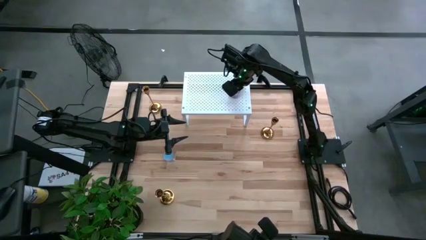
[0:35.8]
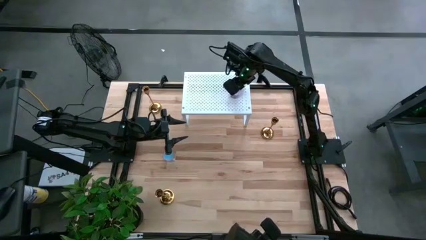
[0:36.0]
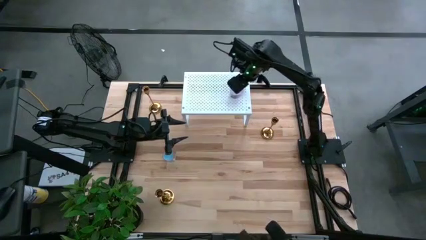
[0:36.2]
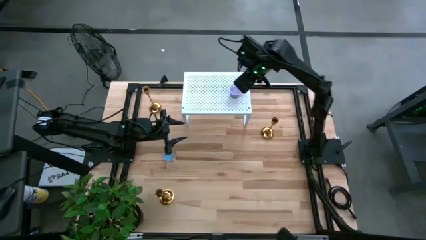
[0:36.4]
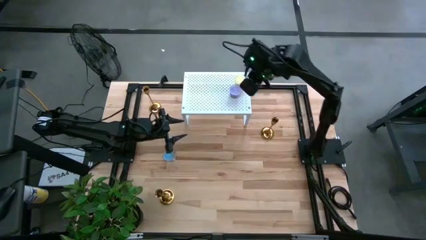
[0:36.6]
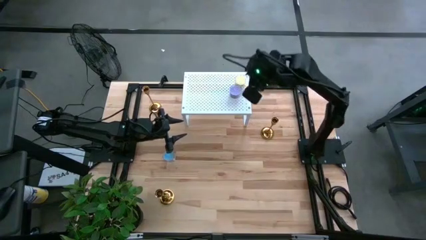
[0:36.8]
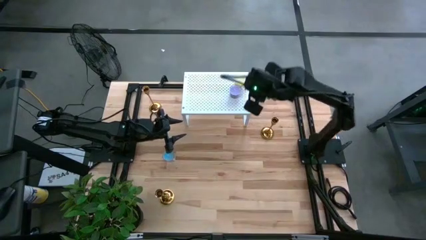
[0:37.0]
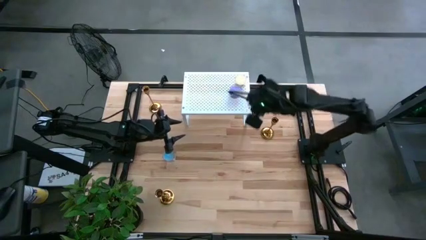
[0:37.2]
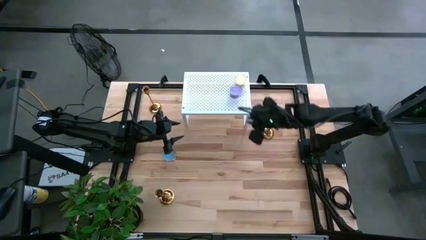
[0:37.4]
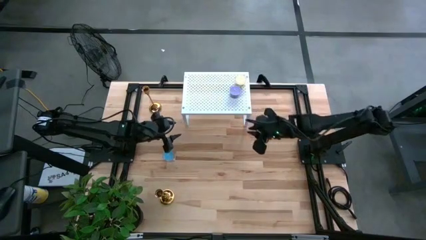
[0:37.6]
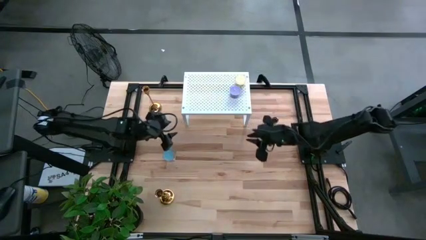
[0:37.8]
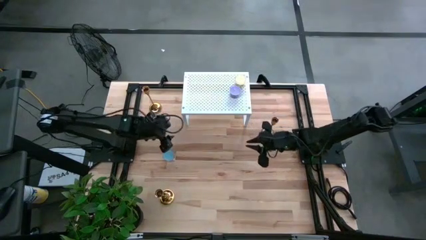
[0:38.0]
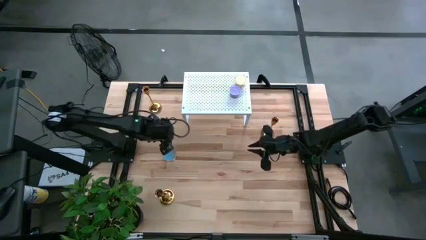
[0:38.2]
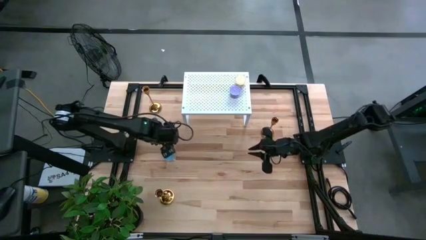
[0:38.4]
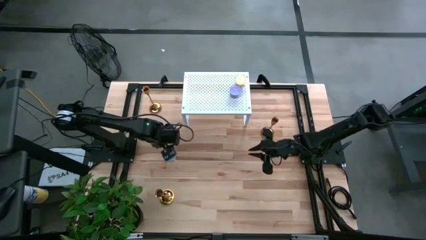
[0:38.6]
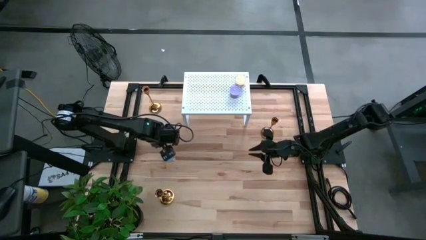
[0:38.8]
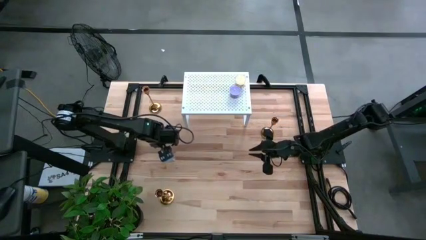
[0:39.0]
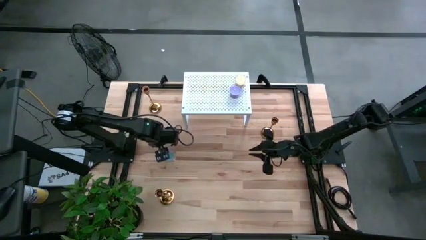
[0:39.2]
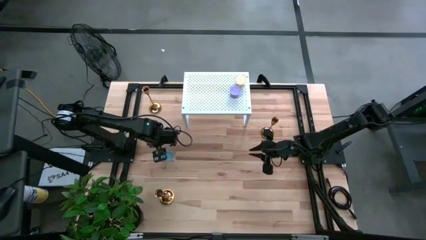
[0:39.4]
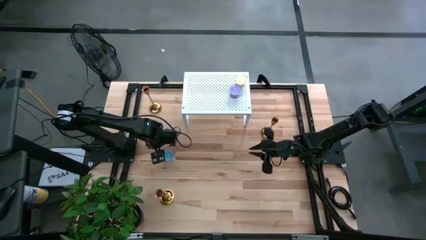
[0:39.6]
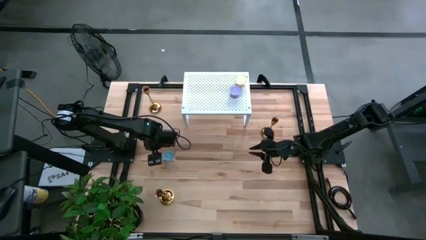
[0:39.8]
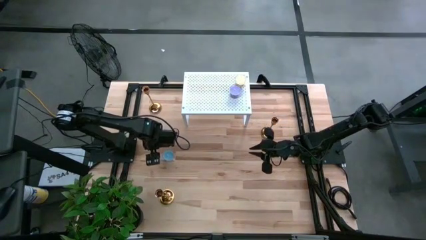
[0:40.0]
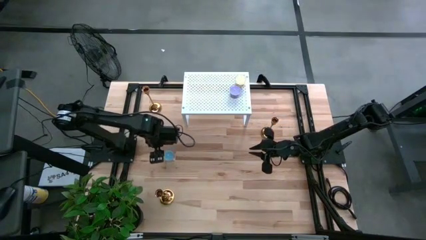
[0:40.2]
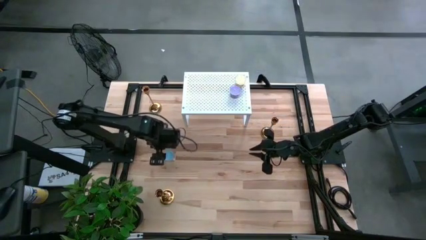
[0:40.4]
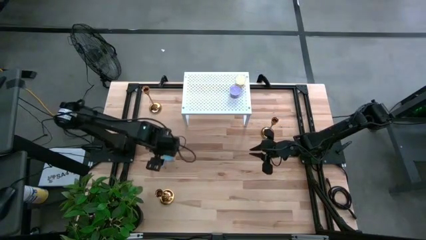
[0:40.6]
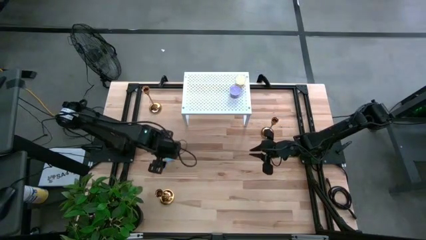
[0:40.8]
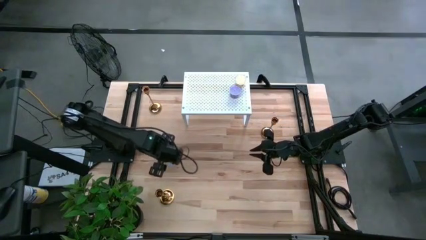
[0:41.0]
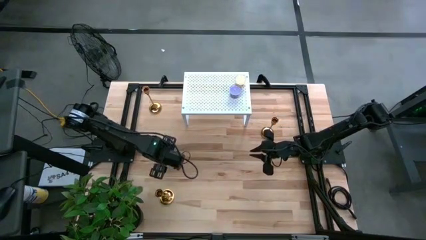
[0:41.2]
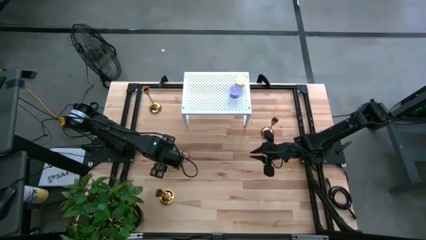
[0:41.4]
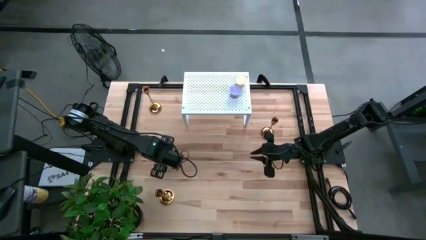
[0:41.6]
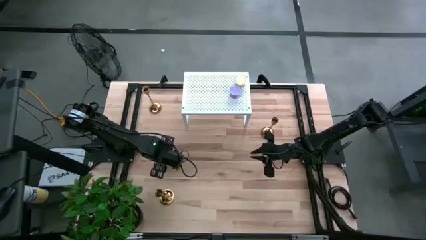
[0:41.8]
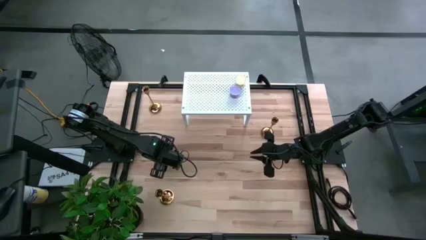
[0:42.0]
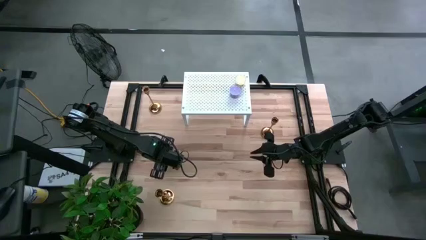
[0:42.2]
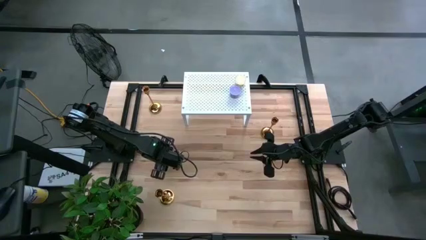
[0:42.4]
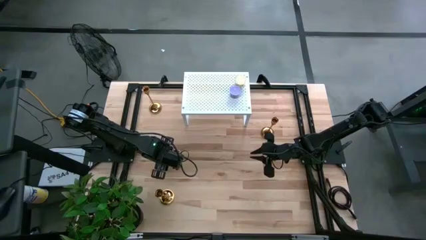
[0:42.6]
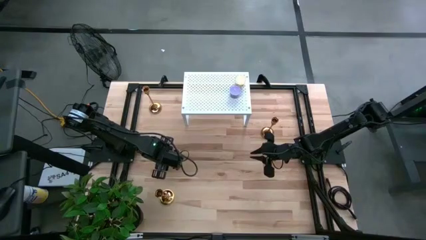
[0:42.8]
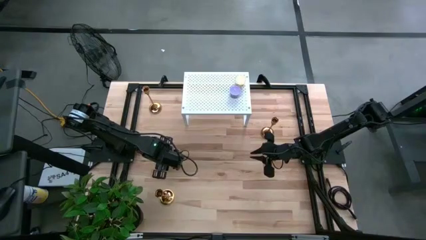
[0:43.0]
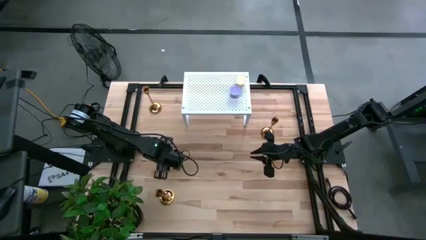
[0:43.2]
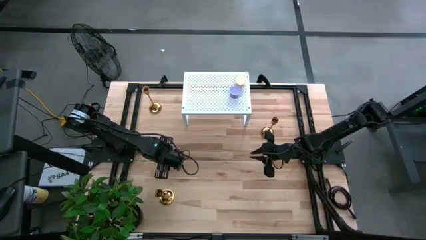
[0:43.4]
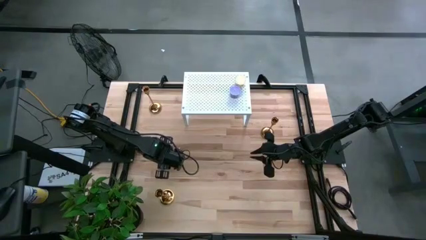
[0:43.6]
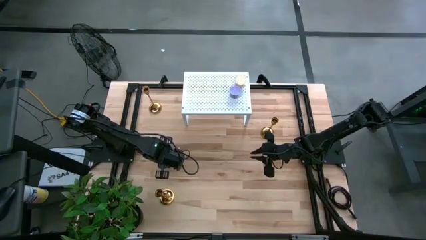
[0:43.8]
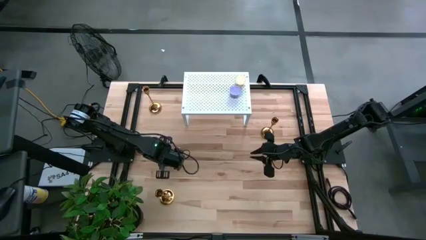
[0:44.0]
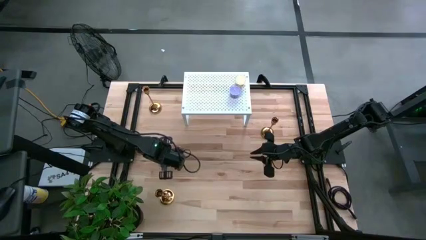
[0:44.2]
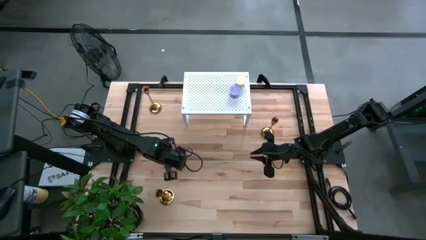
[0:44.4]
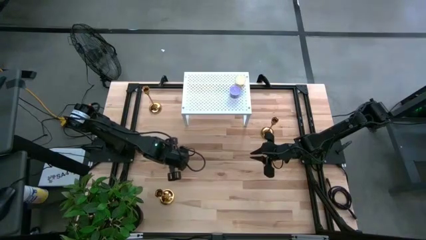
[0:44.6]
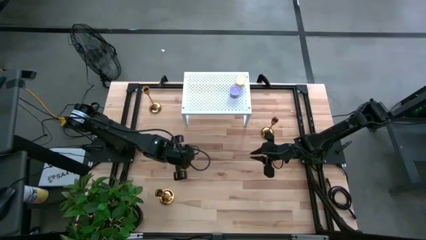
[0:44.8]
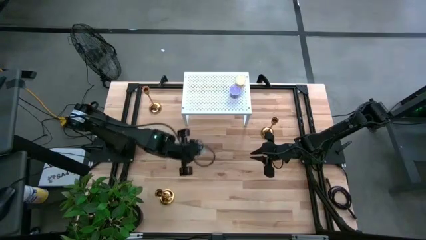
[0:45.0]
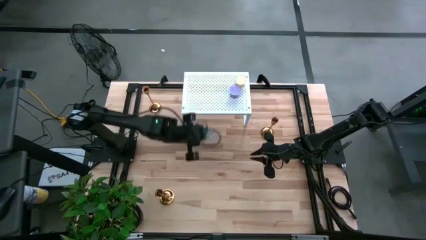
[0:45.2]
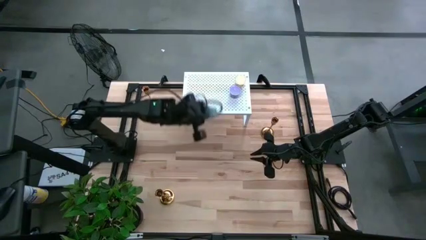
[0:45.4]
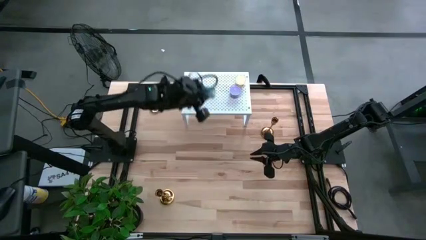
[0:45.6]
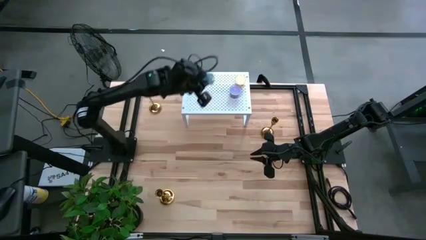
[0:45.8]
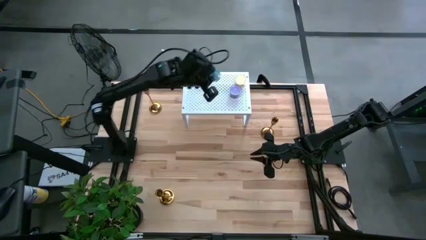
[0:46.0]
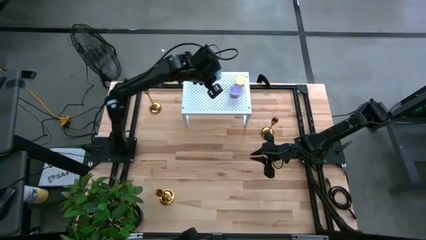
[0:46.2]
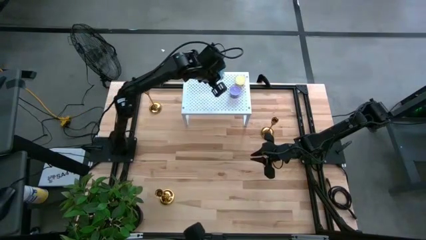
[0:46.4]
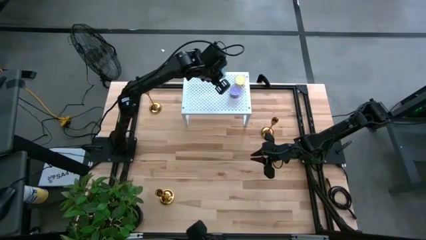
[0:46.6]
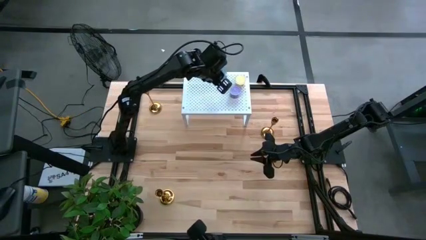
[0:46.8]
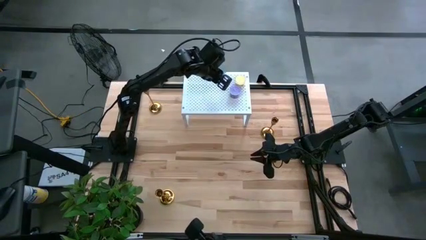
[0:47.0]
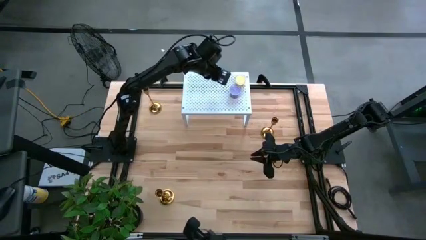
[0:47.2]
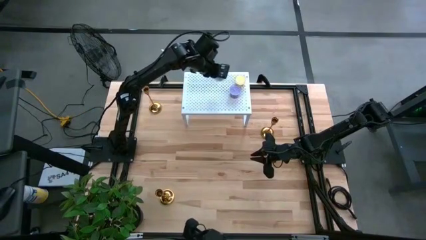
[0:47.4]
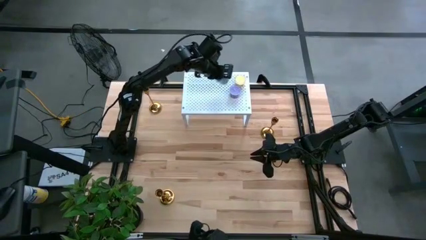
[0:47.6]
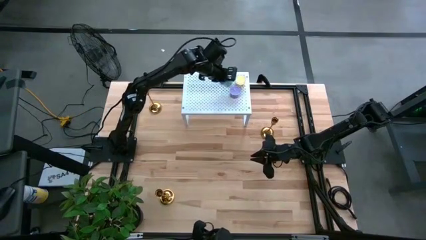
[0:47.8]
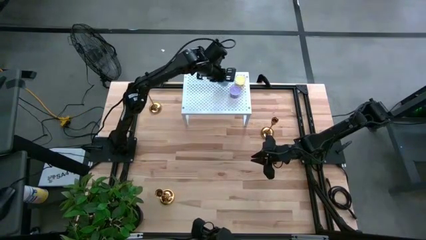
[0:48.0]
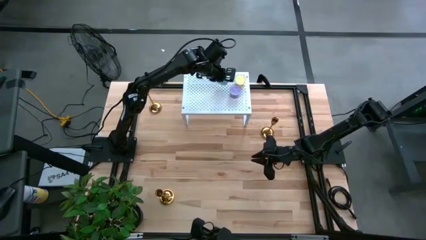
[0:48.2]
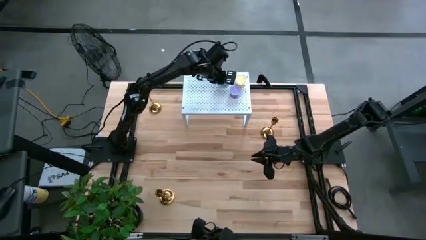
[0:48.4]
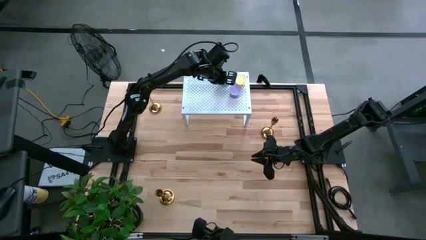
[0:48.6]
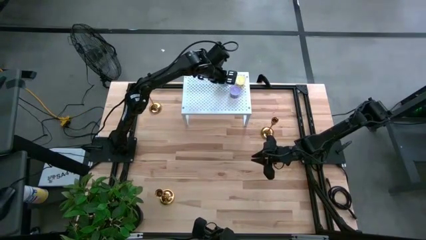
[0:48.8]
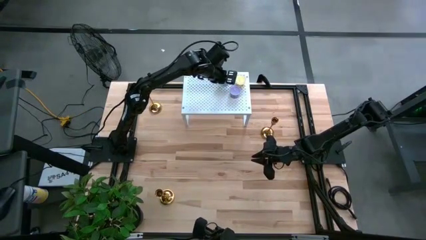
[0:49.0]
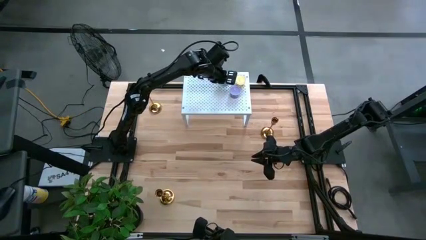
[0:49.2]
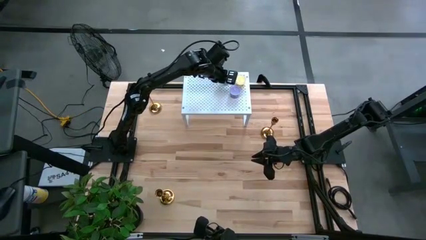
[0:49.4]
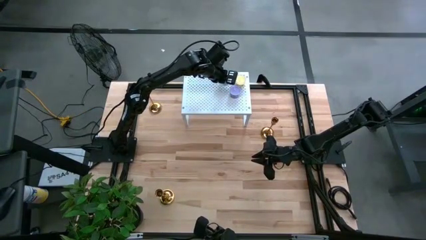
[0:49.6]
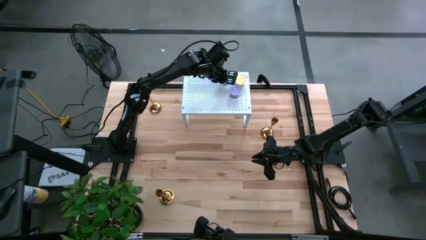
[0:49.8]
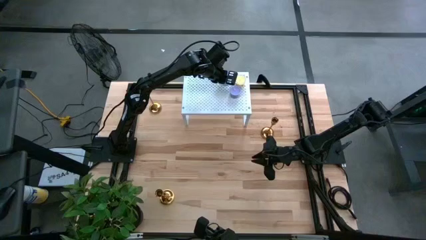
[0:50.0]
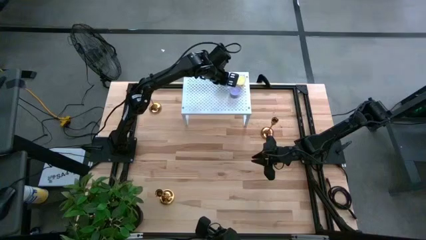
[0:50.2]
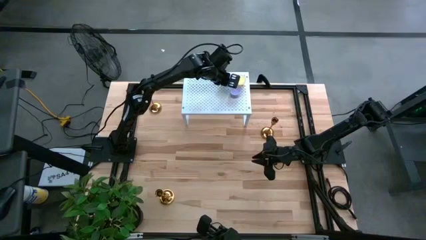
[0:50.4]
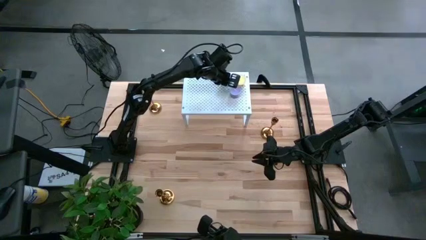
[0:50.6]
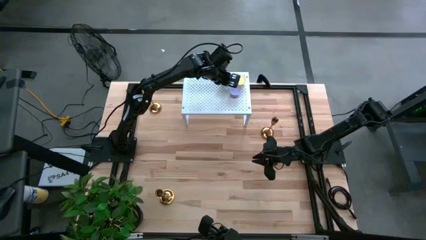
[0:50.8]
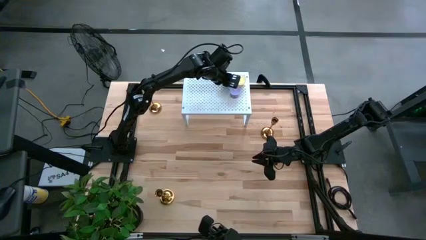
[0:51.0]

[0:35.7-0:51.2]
Task: Pick & Place candle stick holders
Put the blue scented candle on the shelf
